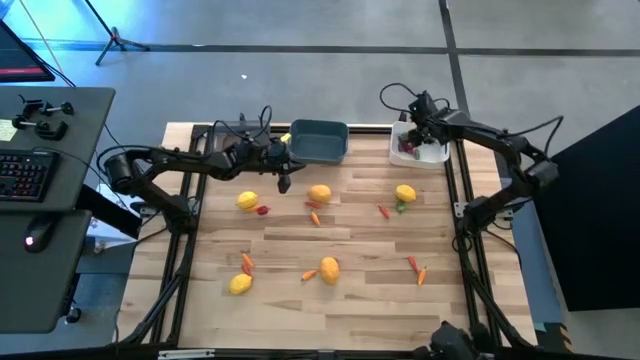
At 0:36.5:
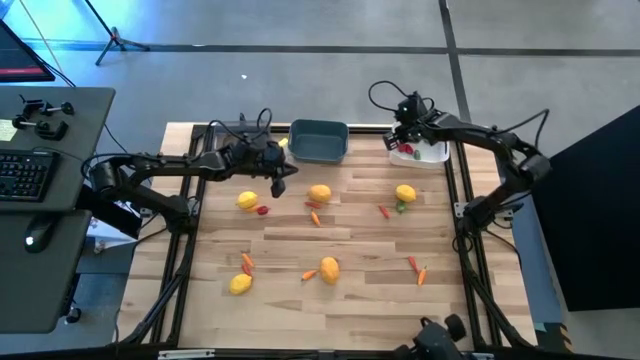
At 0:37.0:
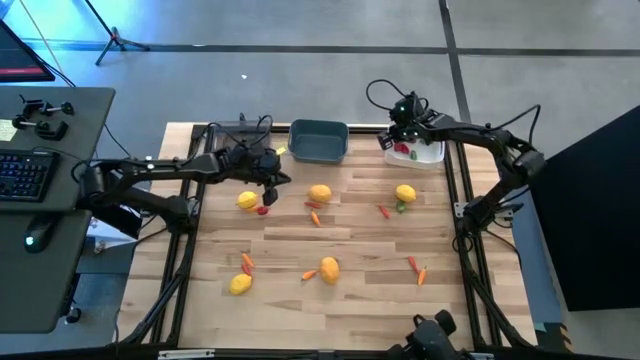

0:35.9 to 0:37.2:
Task: Sort produce into baskets
Adjust the white bin

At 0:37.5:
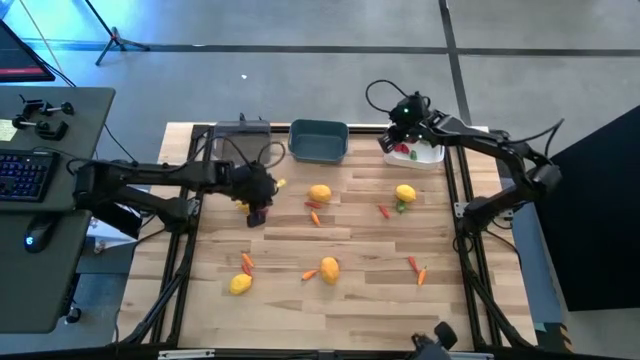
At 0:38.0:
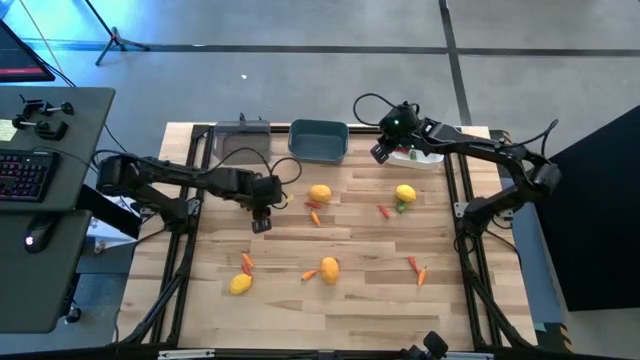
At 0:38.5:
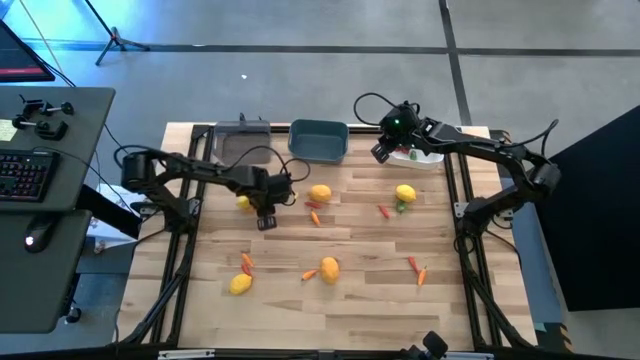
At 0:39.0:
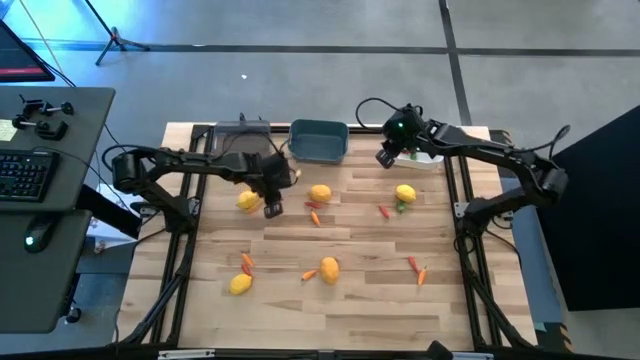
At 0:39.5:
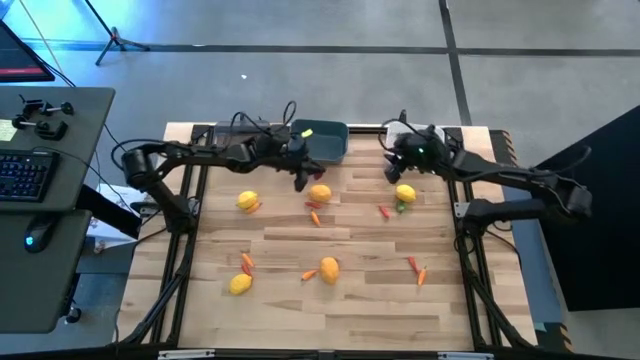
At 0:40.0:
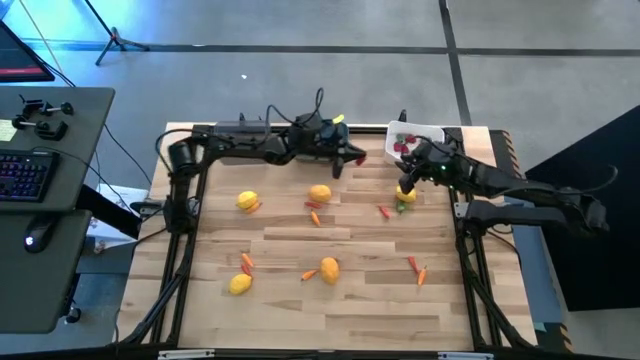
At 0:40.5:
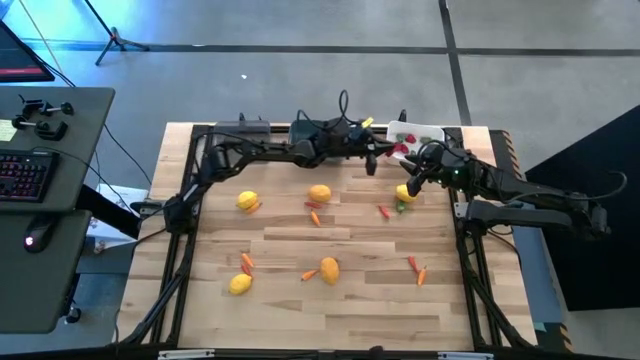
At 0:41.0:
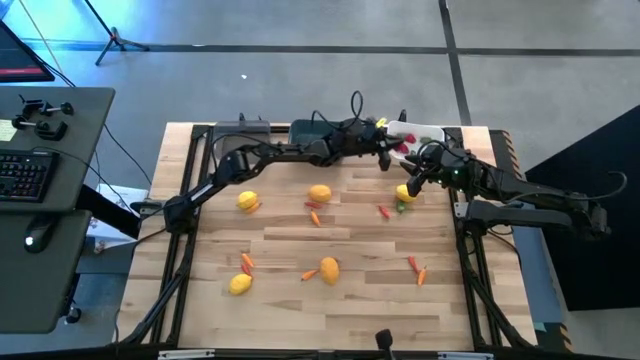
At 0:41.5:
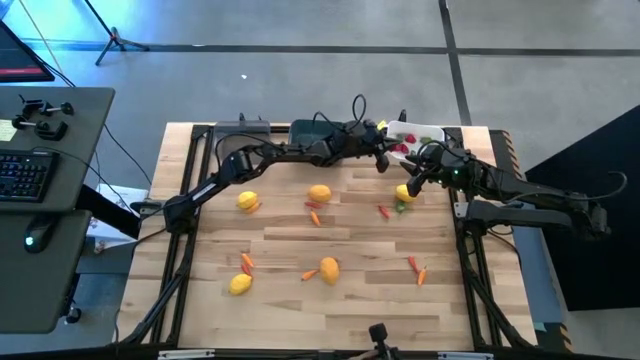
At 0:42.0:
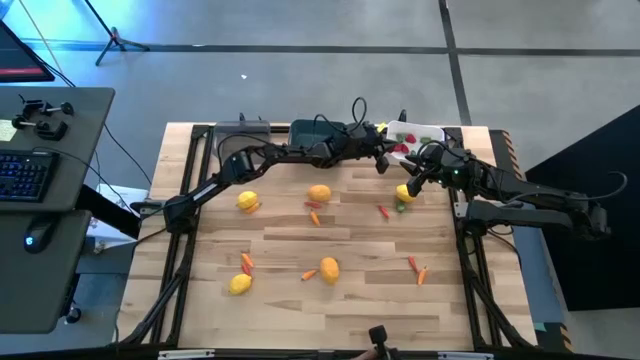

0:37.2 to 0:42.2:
Put the red chili pepper into the white bin

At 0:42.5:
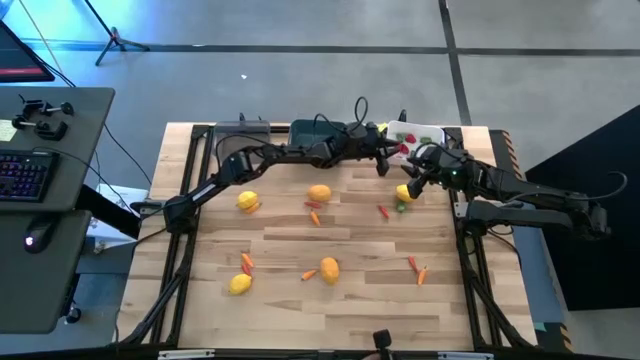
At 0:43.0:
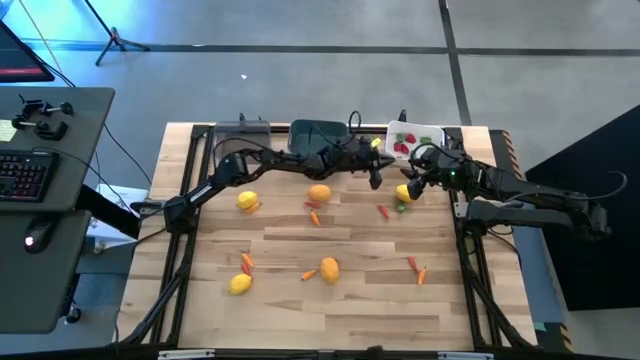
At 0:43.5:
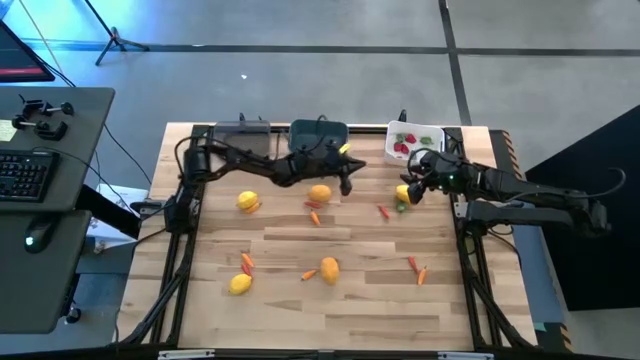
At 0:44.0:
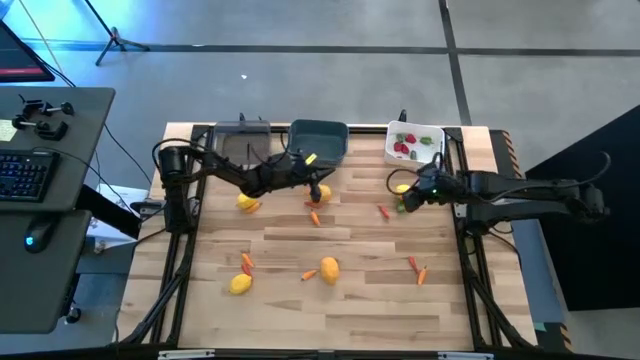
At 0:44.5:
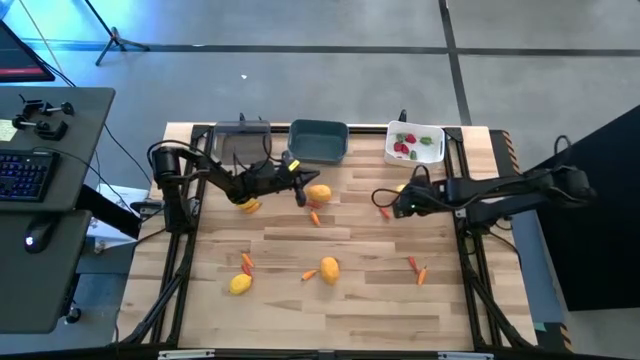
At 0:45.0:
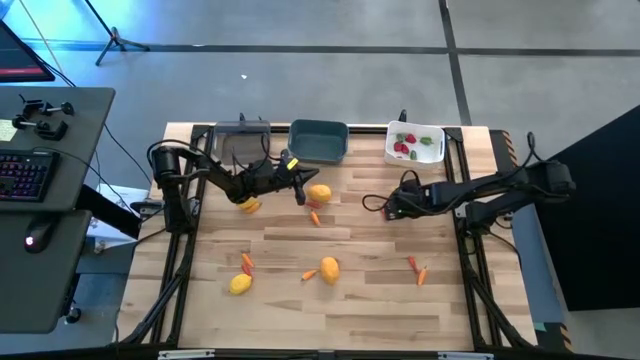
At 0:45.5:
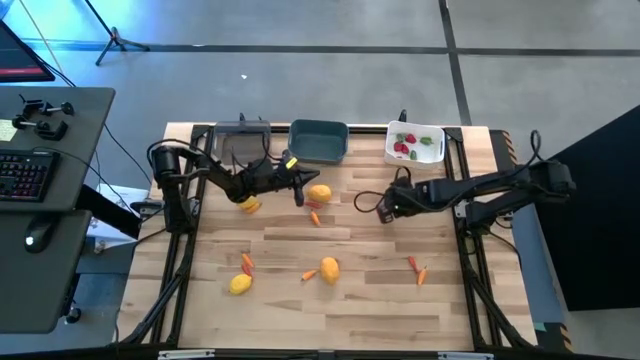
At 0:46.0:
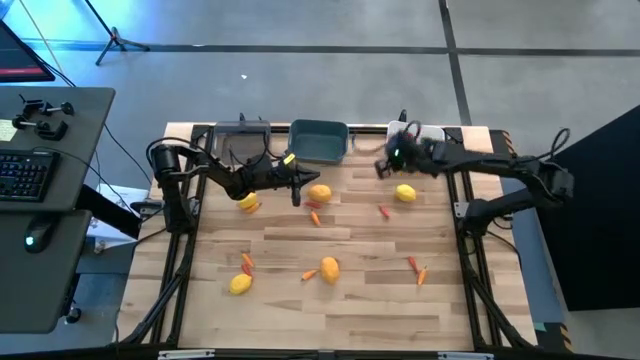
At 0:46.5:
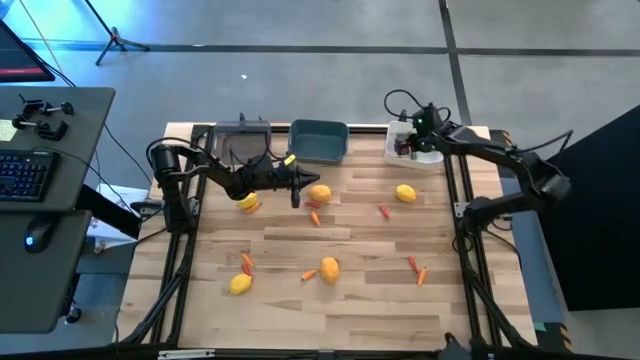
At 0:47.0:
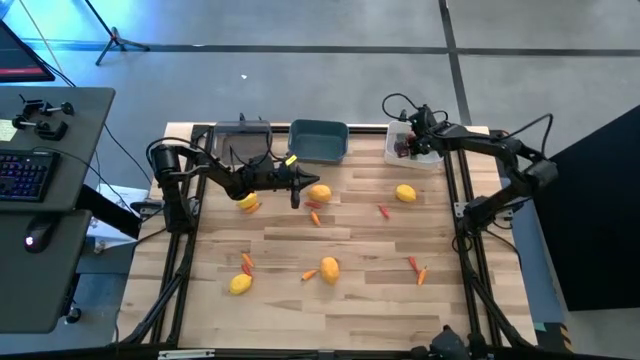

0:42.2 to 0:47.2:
Put the green chili pepper into the white bin

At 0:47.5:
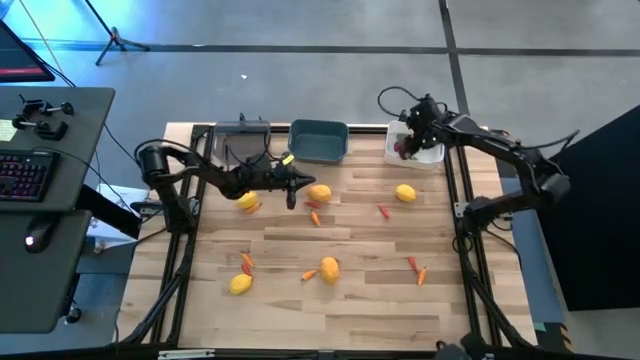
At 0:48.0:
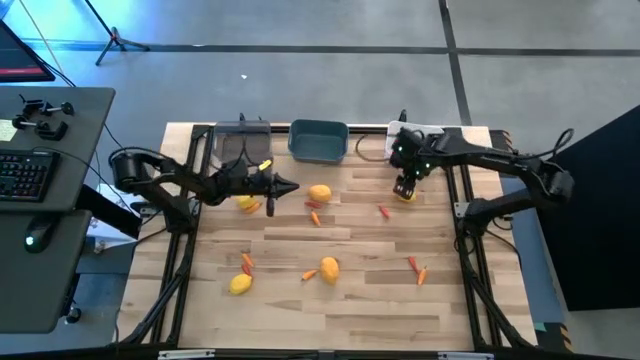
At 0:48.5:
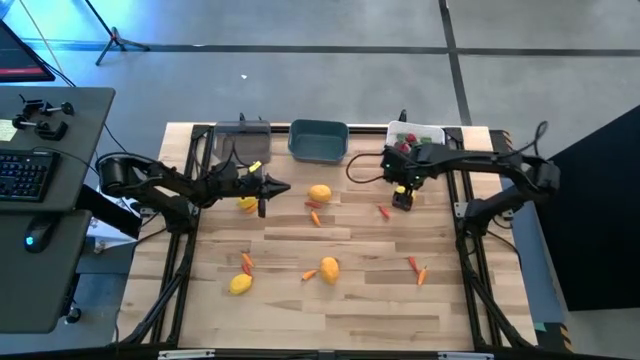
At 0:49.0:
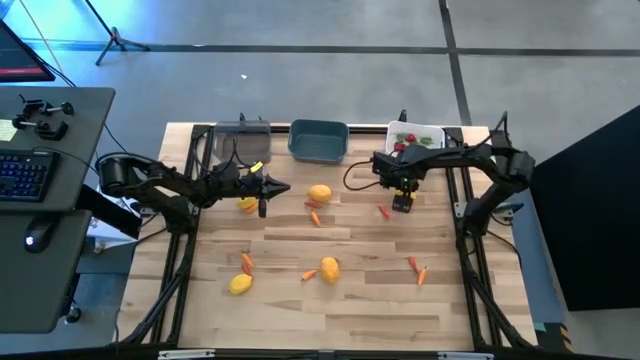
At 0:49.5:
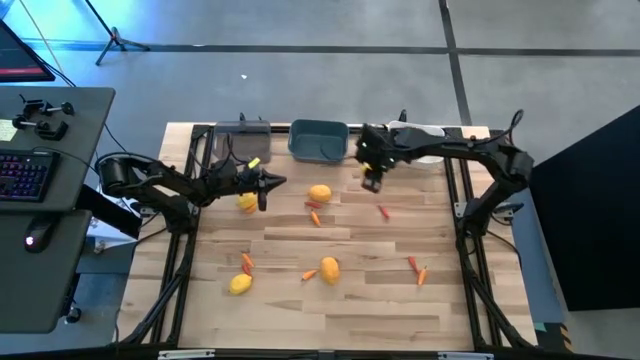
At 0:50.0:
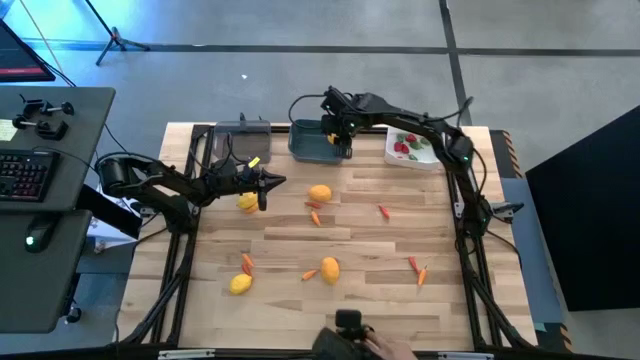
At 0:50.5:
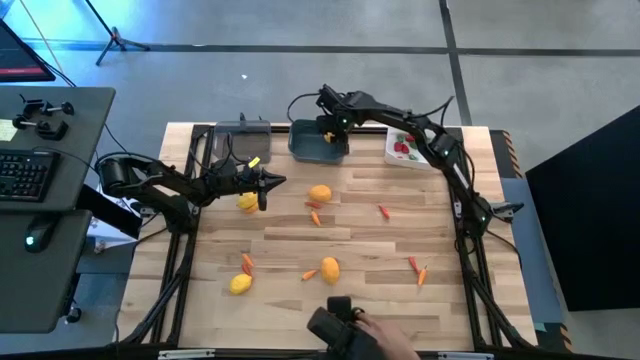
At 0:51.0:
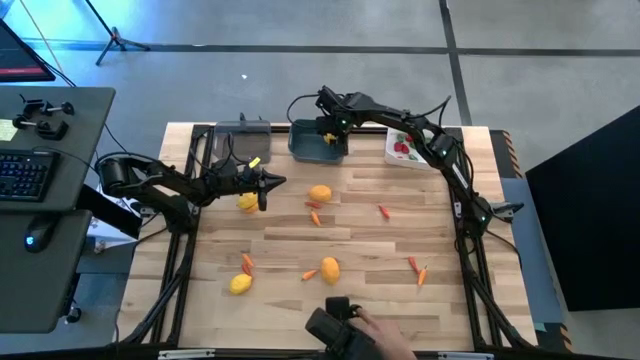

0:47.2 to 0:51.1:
Put the yellow lemon into the blue bin

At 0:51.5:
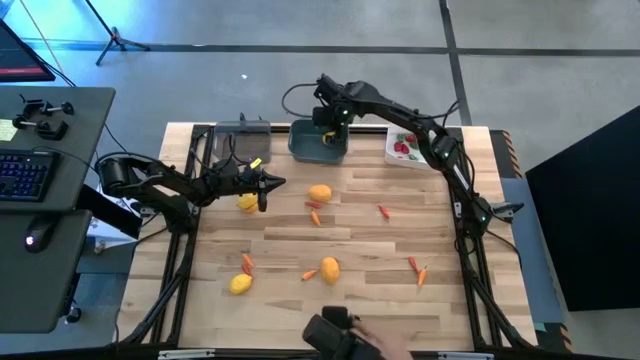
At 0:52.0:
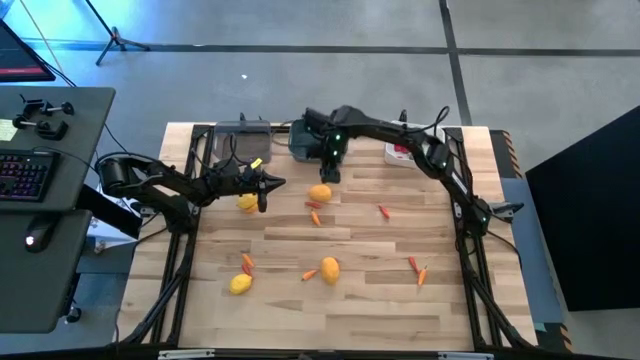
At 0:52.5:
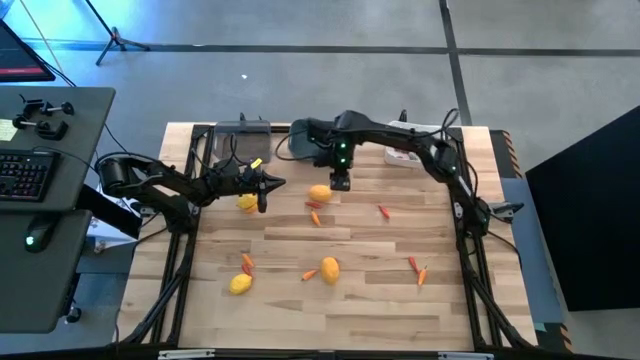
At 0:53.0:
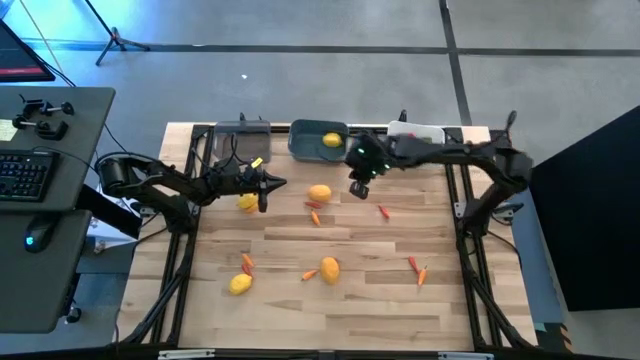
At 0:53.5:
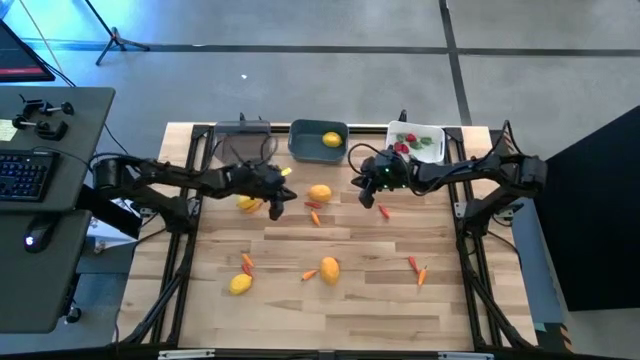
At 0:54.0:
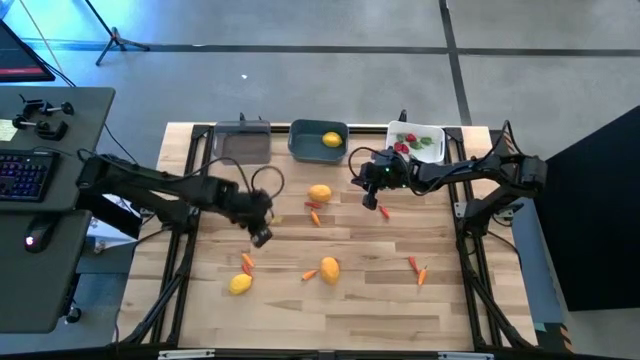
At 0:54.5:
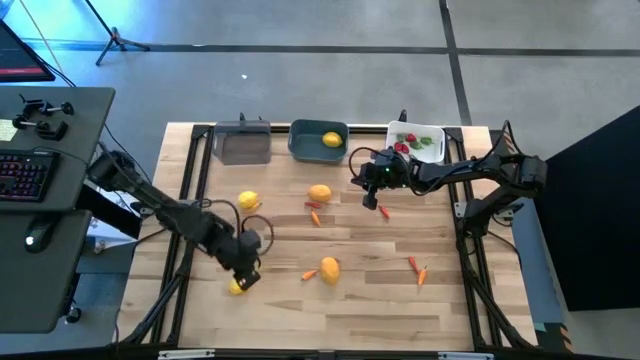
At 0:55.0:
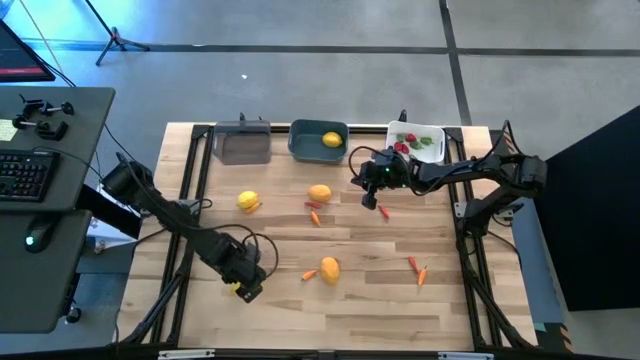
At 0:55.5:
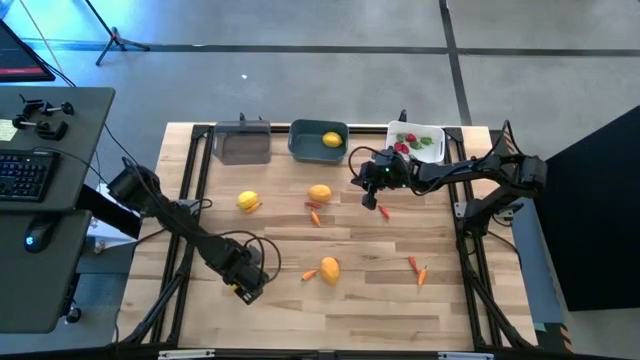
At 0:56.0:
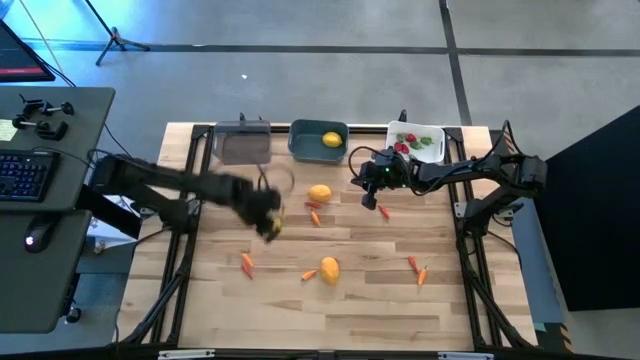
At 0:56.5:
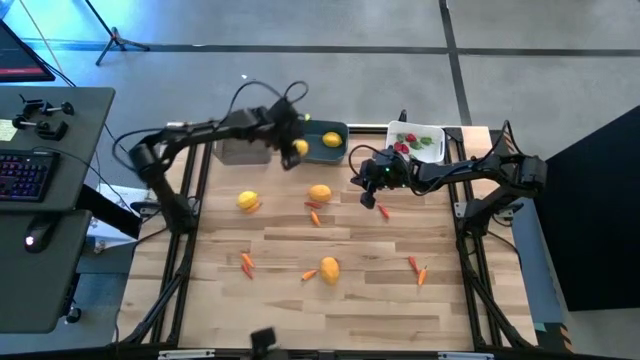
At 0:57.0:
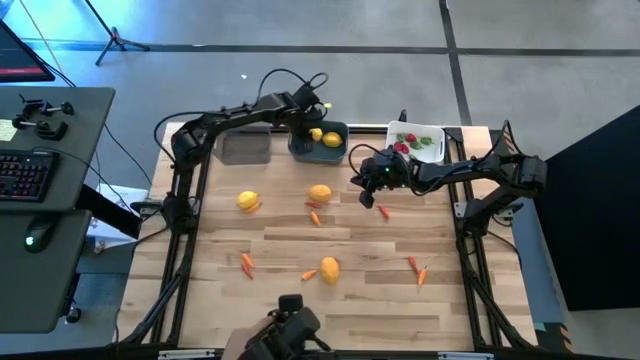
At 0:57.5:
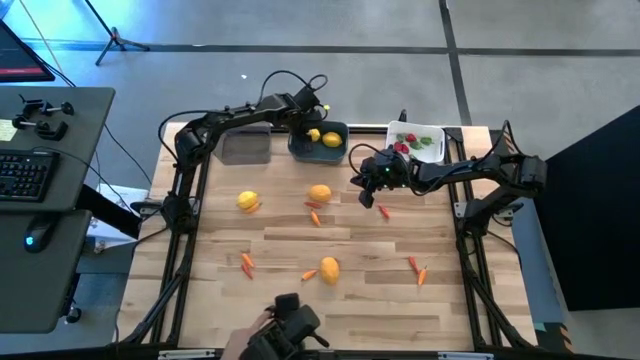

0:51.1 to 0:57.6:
Put the yellow lemon into the blue bin
